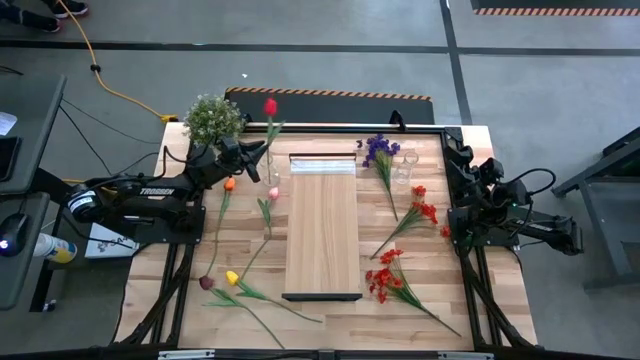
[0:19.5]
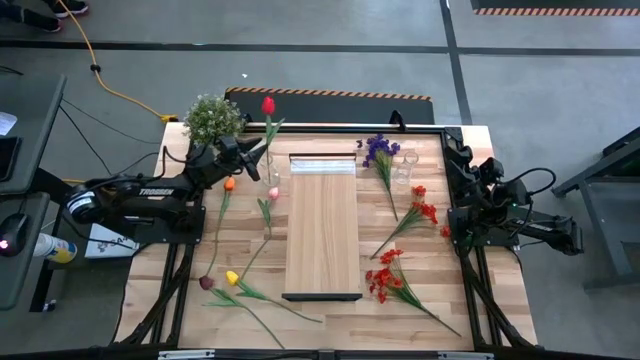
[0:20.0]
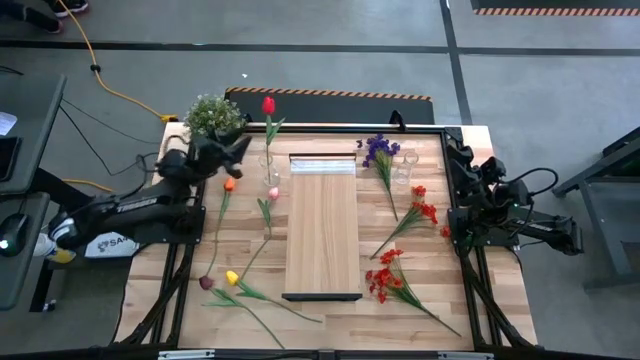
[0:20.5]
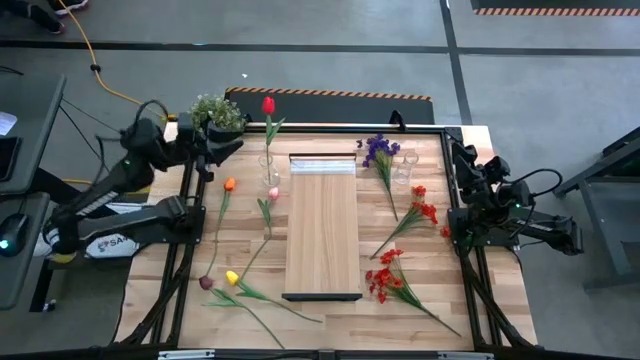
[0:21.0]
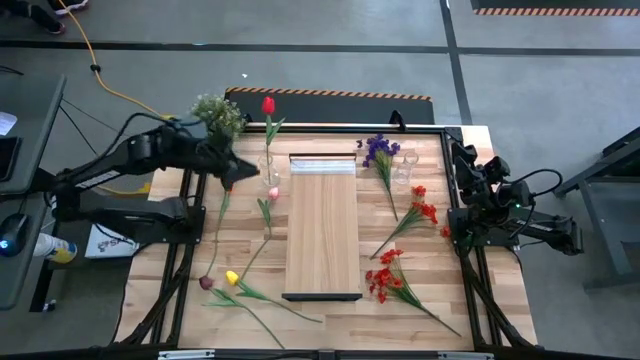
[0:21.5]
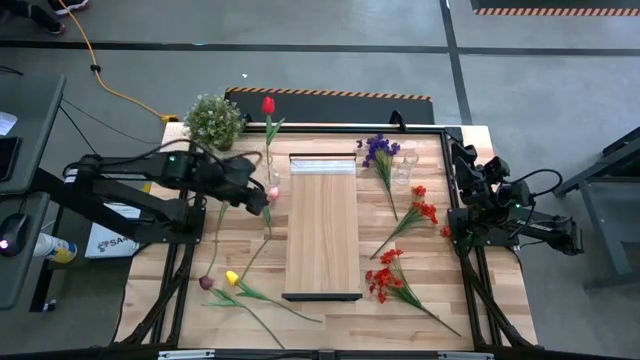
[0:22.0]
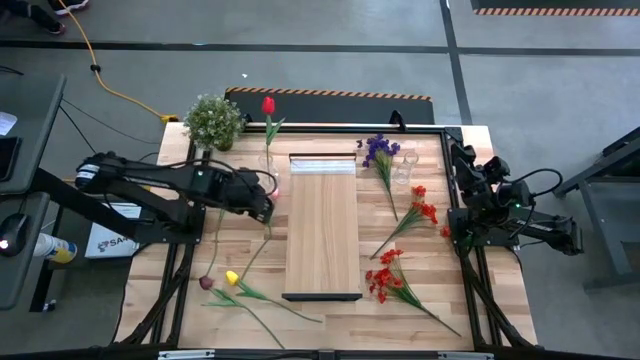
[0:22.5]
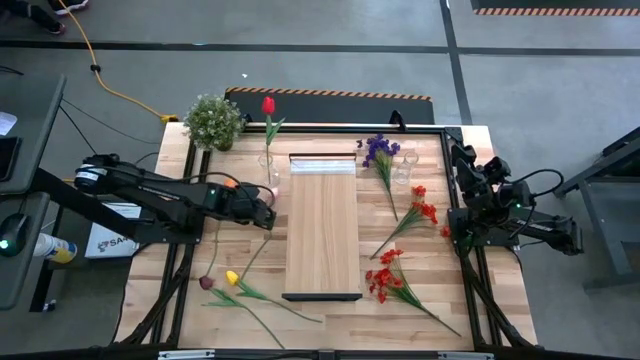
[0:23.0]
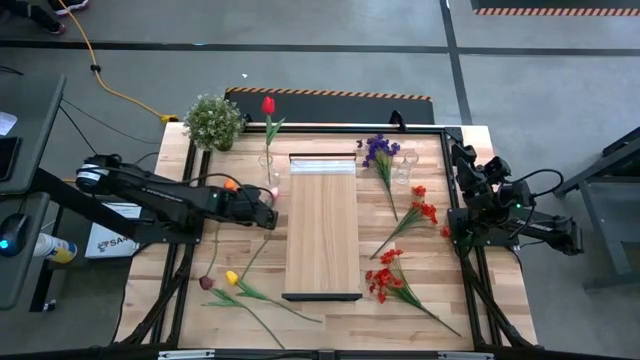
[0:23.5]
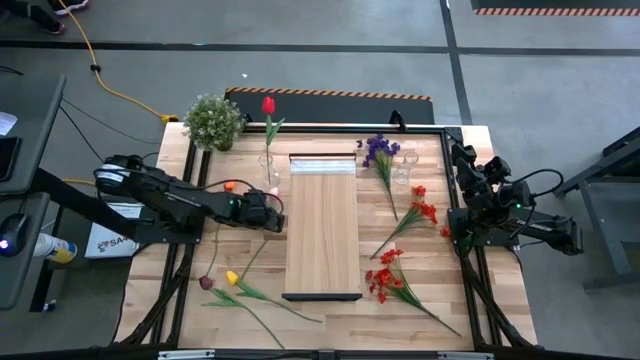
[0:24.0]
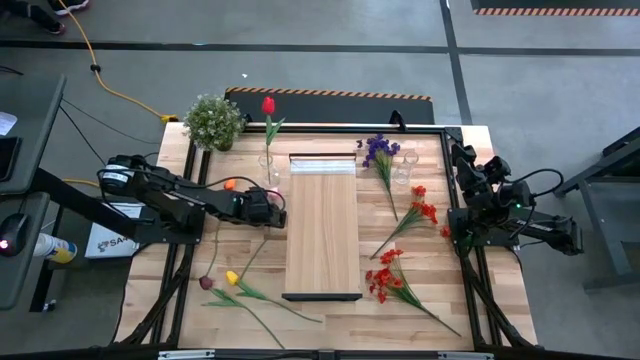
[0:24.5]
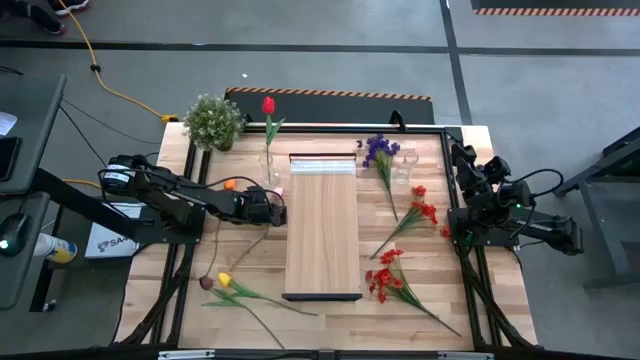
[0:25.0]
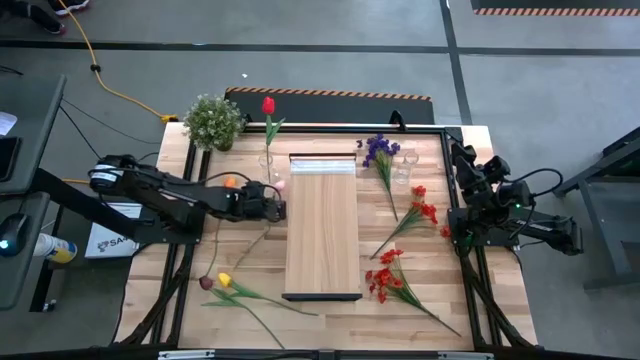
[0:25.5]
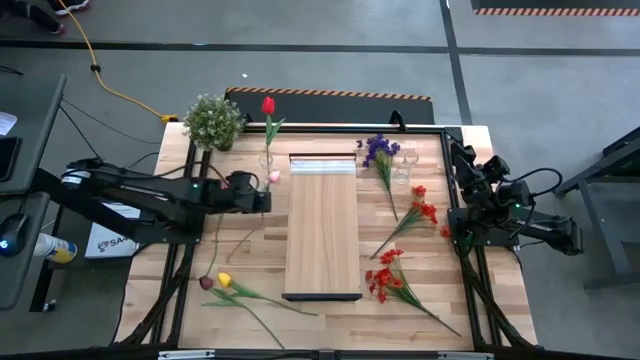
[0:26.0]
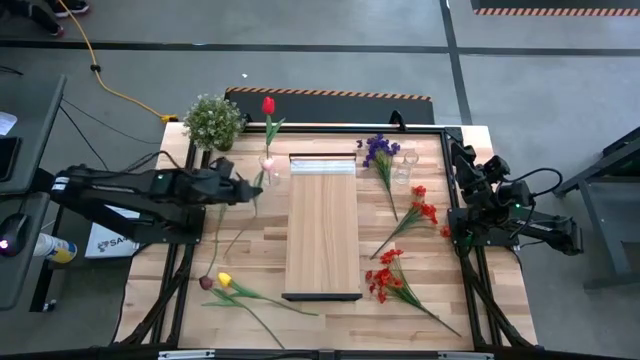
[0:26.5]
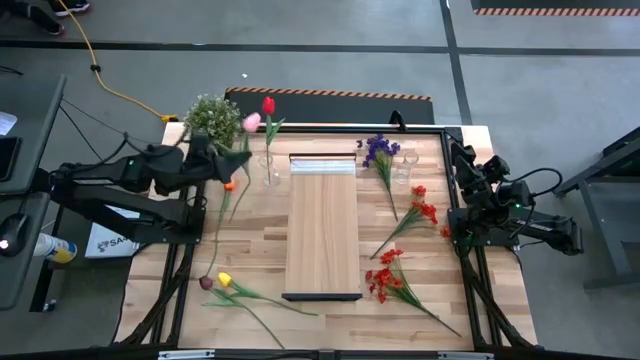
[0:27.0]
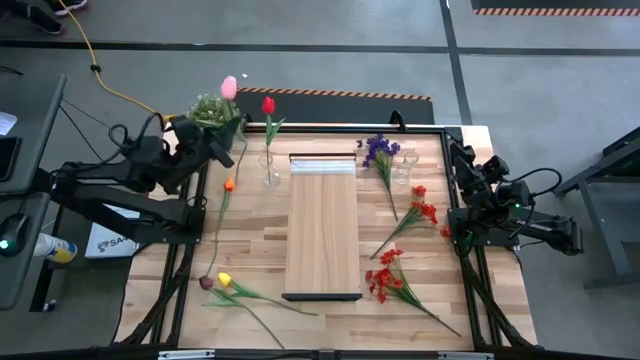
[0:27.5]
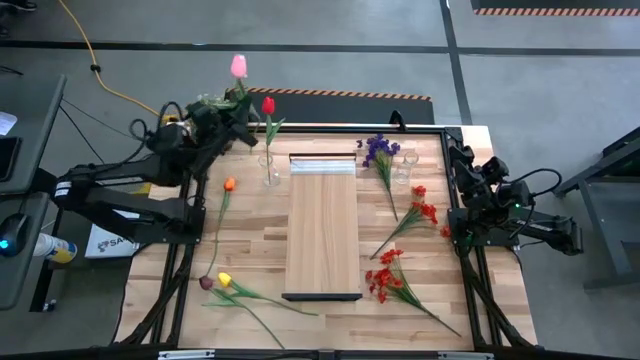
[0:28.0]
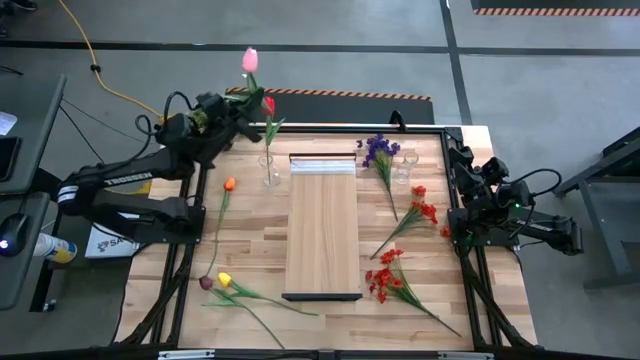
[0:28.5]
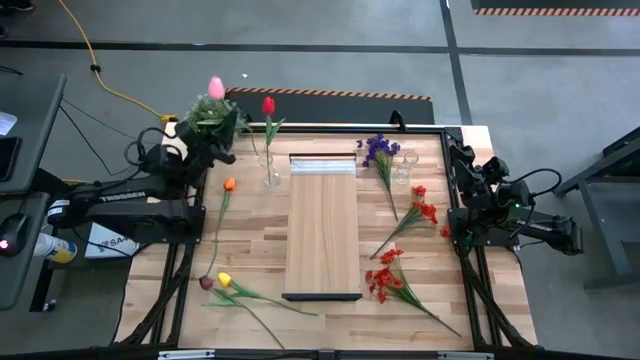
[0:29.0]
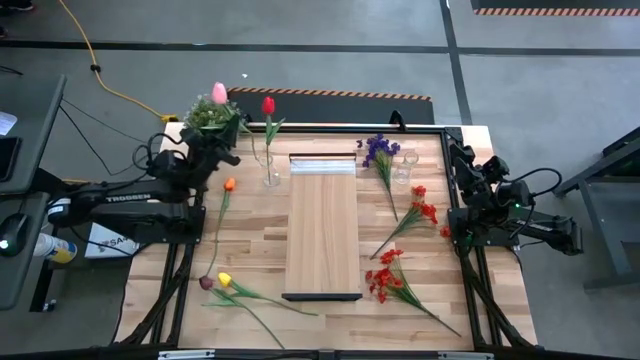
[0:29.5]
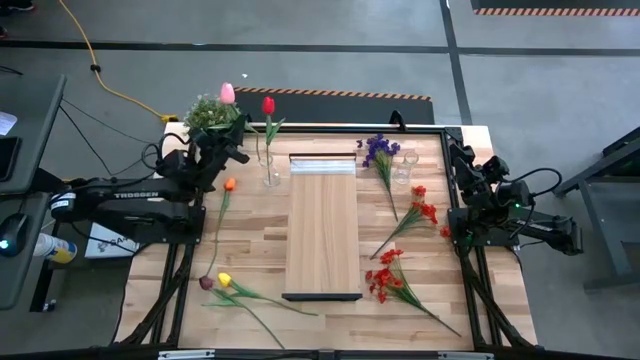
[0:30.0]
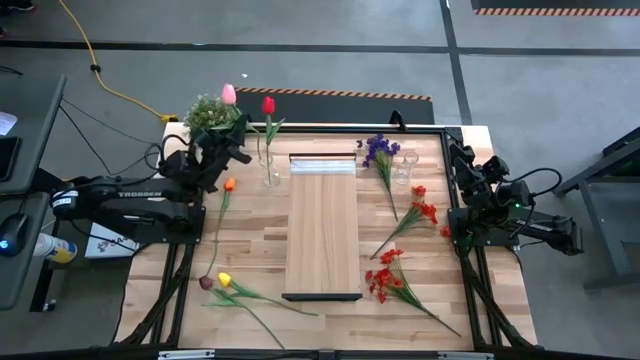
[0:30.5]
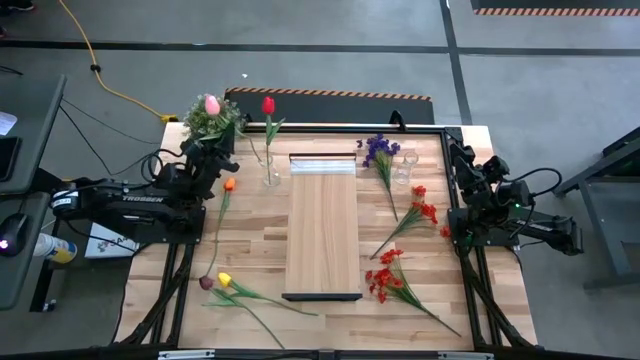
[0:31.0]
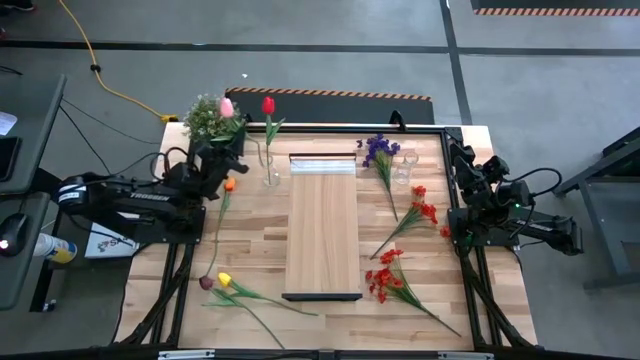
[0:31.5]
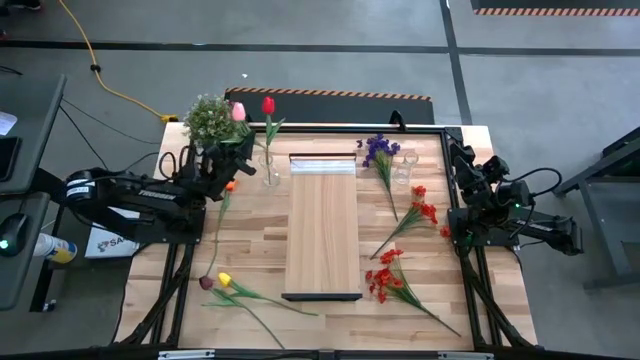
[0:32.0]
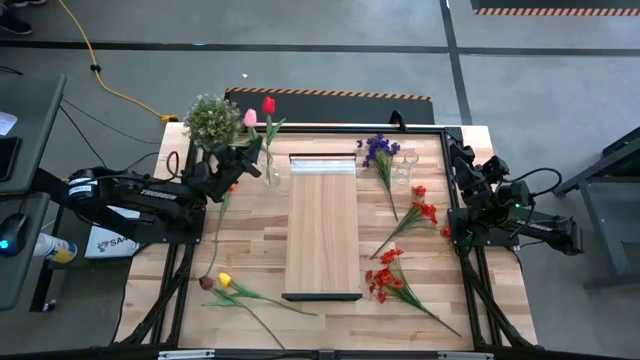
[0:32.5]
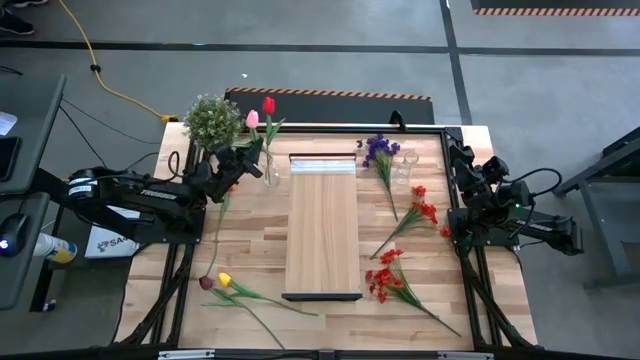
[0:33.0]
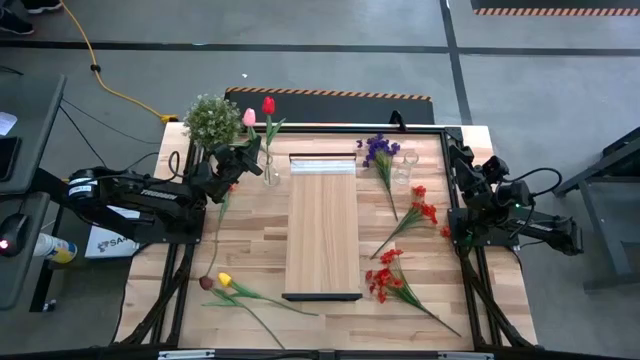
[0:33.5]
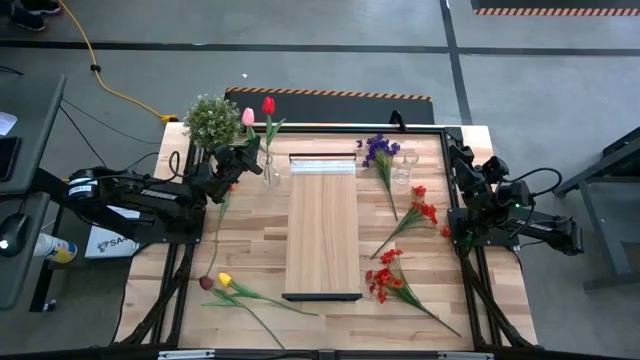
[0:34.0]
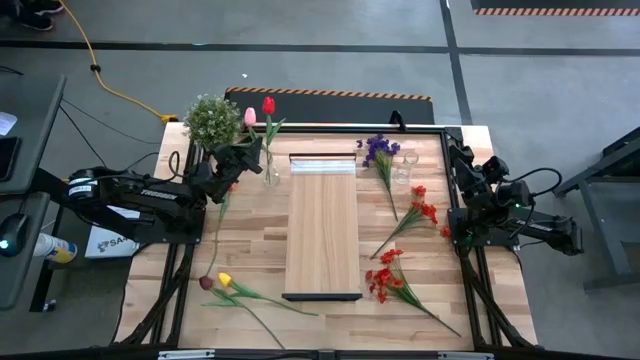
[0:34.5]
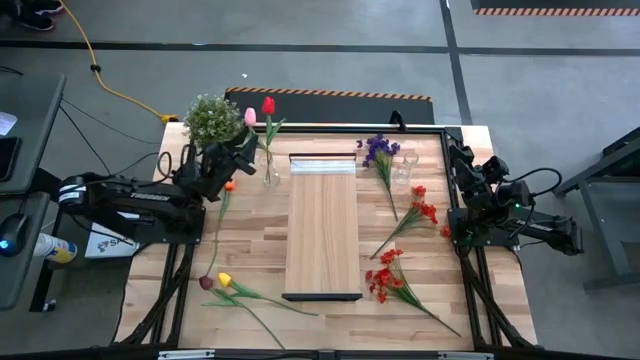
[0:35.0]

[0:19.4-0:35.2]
Task: Pick and place flowers into a vace then onto a shelf
Put the pink flower into the left transparent vase

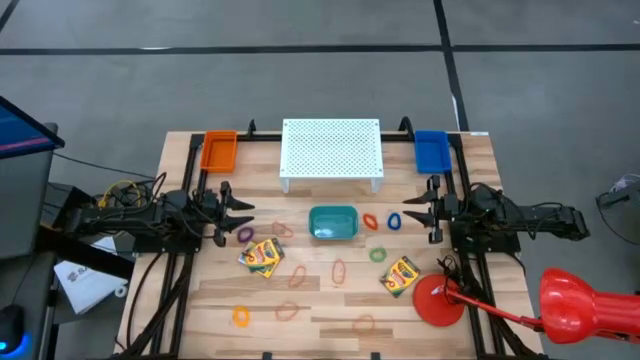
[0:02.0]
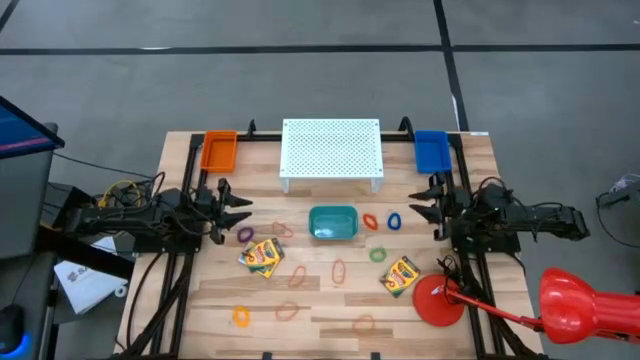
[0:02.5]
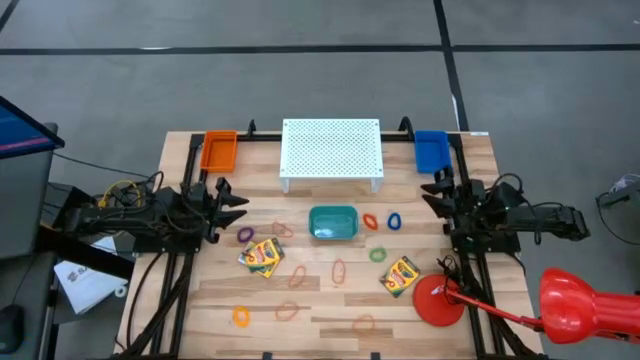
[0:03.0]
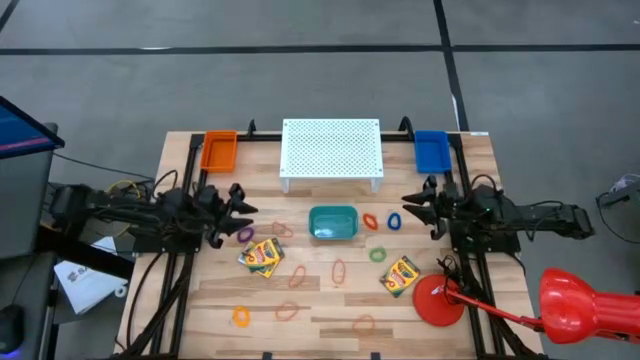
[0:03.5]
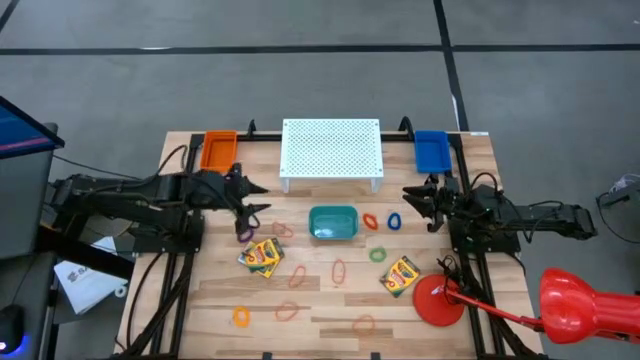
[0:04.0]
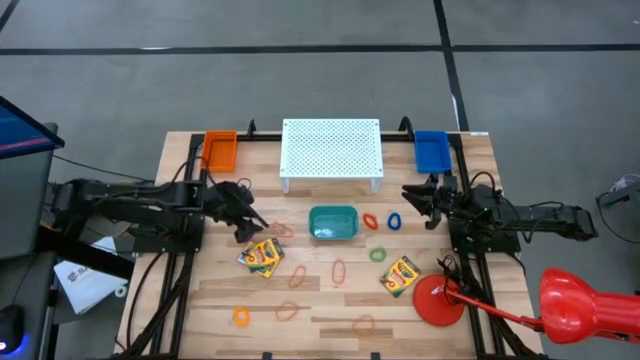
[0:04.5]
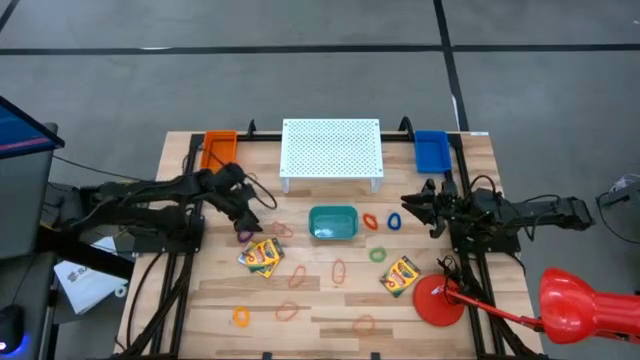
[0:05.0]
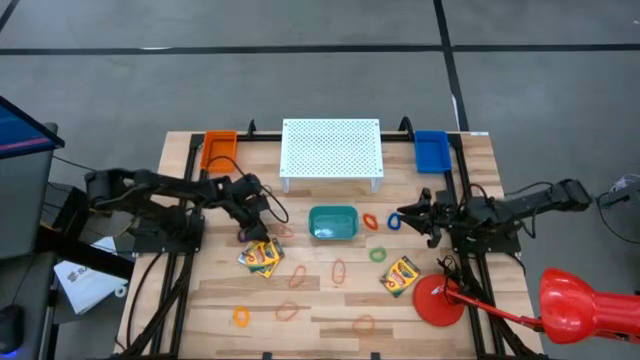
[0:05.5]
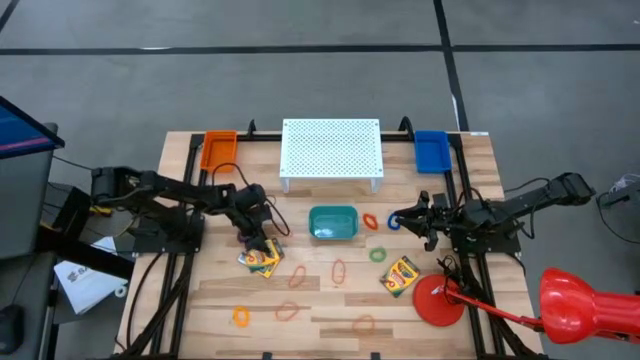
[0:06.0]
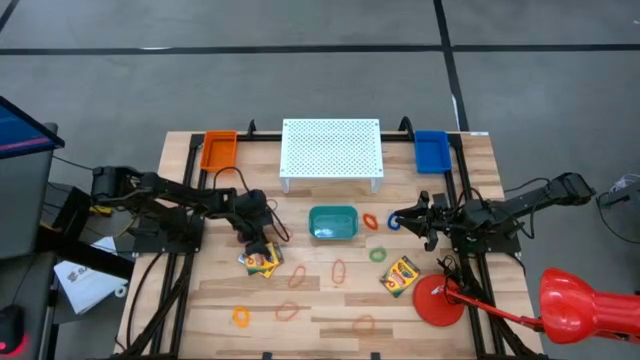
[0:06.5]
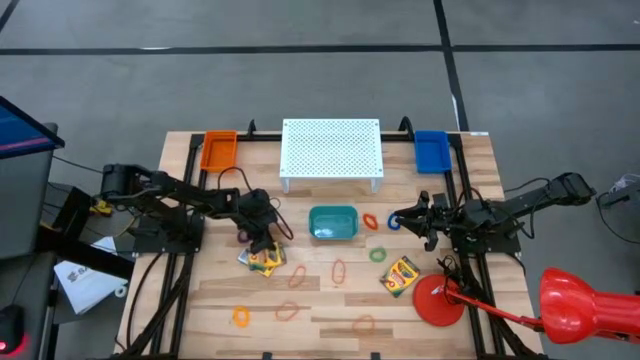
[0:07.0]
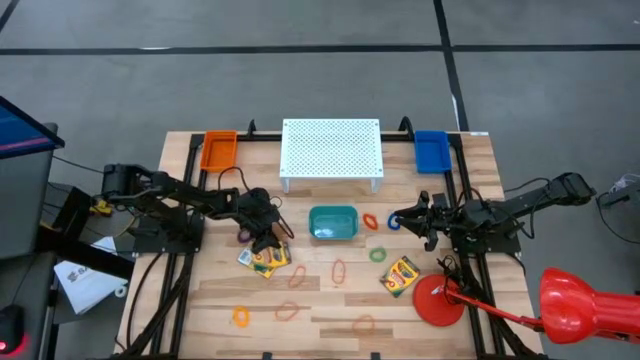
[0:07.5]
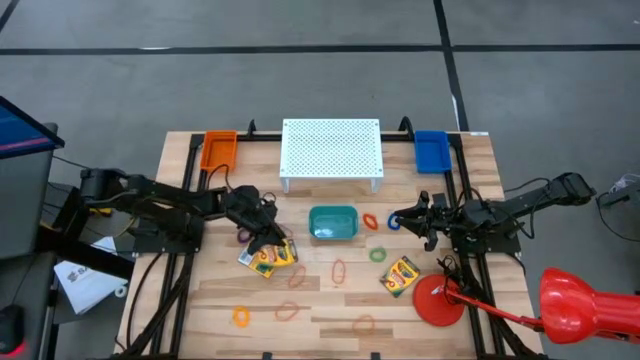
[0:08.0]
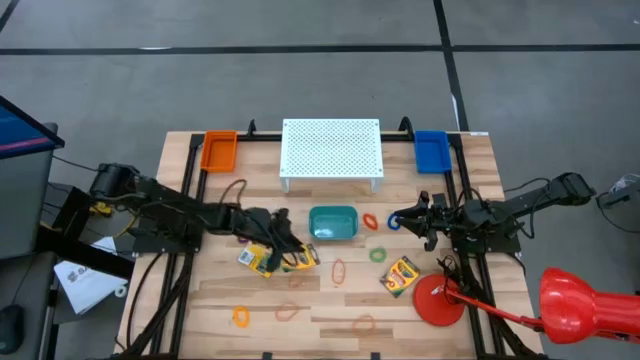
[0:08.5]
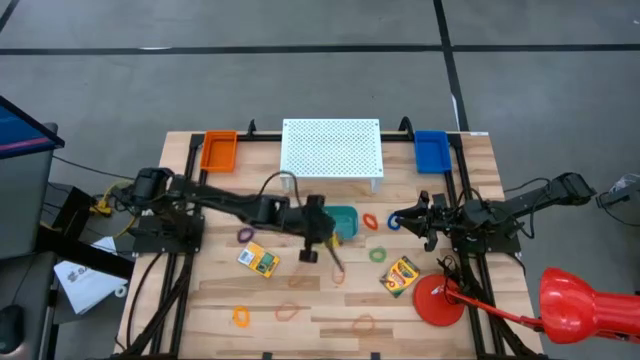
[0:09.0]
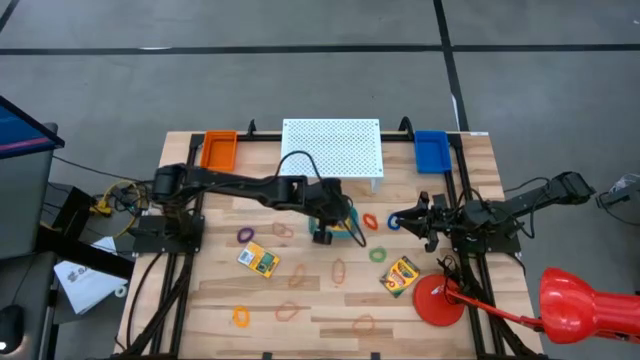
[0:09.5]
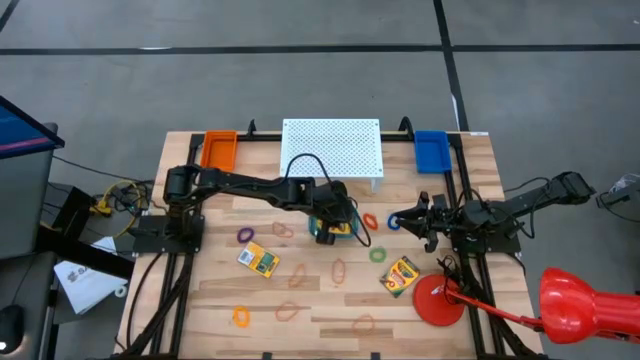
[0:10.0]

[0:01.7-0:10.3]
Task: Pick & Place Office Desk Supplies
Put the yellow crayon box into the green bin
